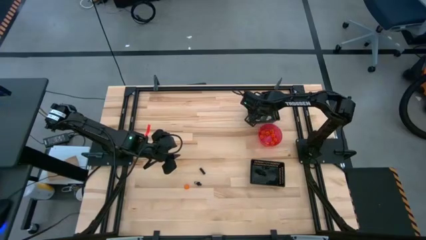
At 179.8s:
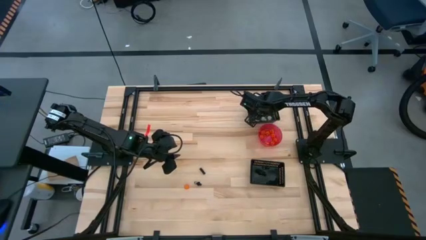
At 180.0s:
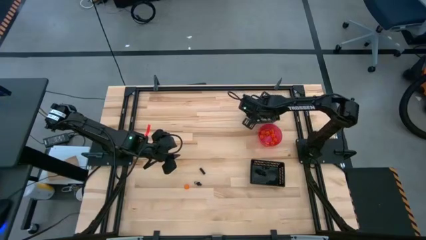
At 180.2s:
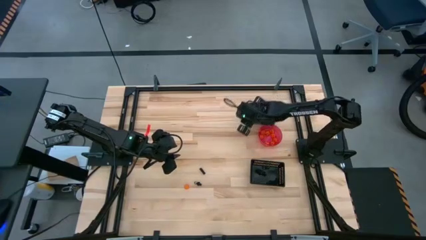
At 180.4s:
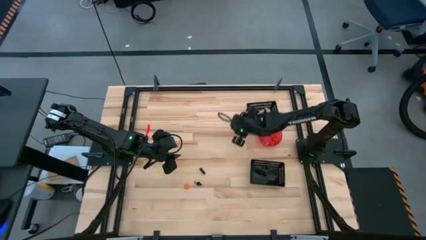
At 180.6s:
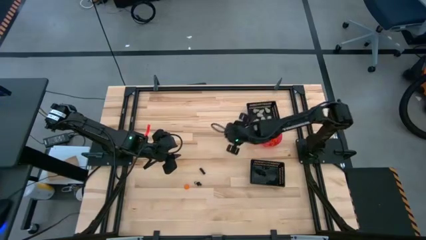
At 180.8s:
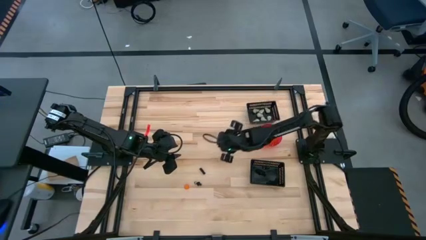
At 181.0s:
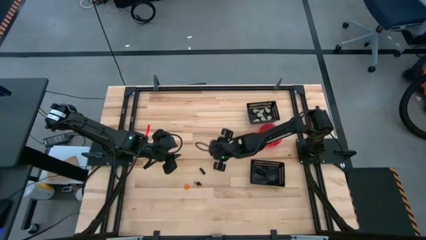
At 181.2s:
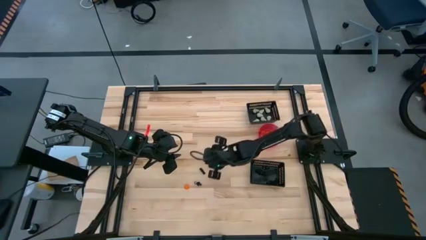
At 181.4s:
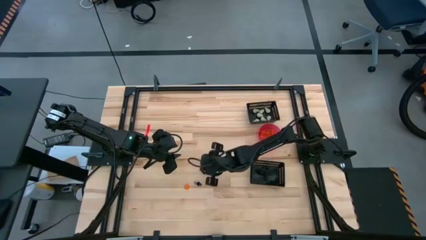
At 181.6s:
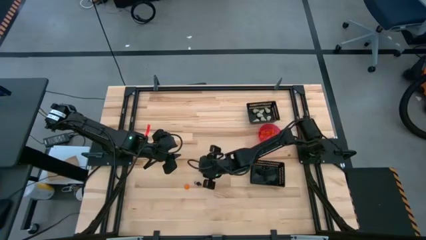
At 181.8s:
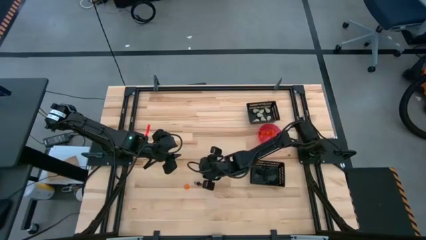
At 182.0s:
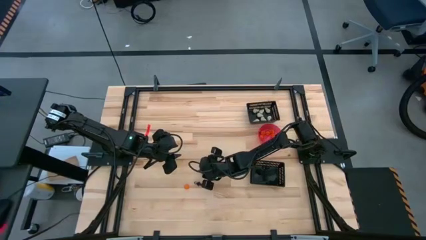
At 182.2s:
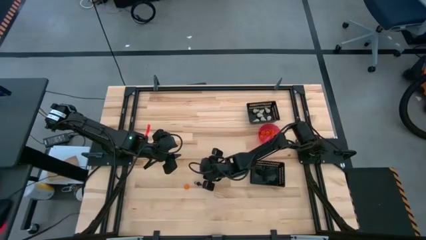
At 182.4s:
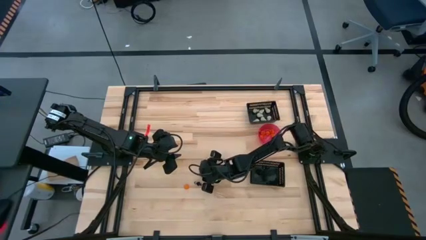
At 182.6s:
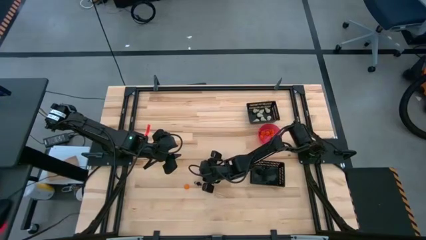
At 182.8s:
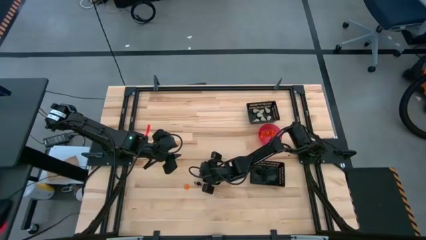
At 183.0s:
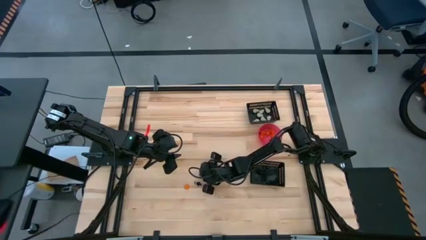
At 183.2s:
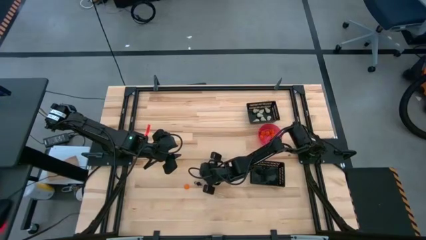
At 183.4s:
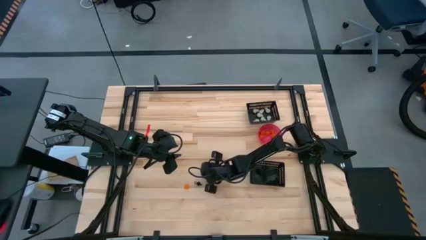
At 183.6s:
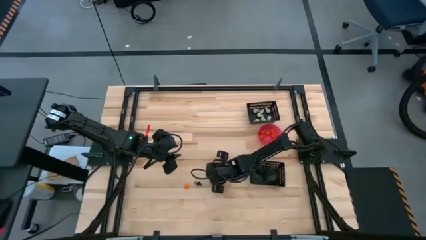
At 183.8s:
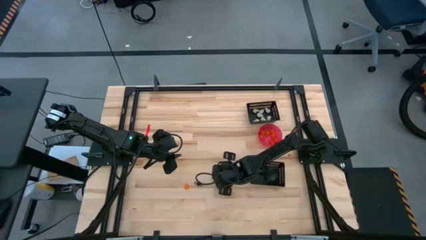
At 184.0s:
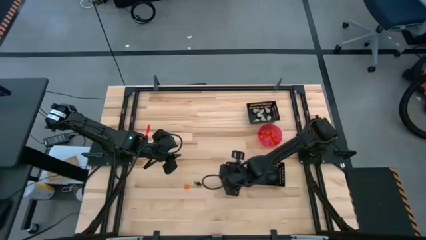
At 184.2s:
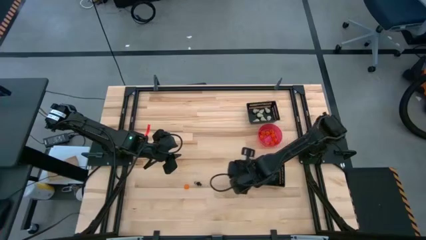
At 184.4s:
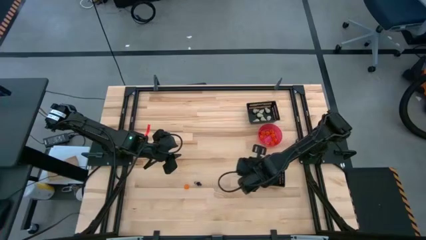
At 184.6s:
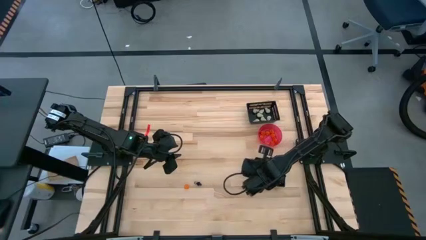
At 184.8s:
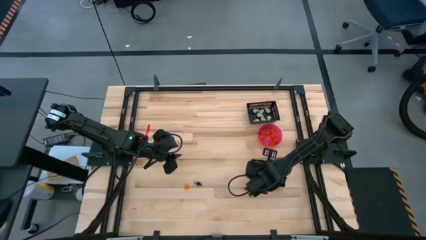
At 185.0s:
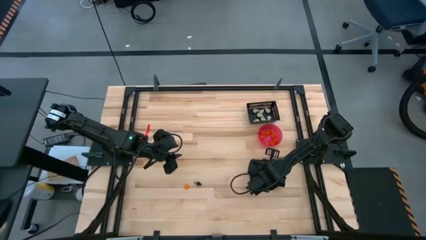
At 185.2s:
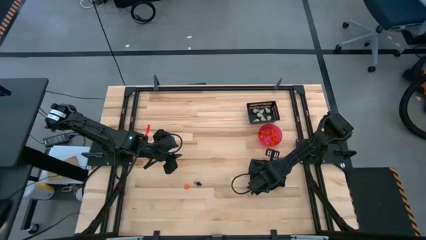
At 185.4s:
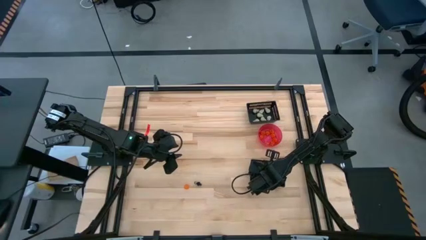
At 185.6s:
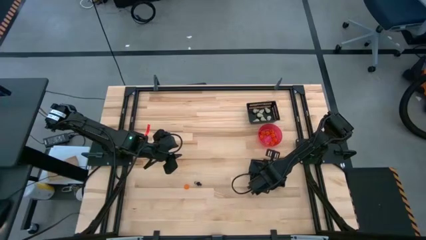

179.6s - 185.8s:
Task: Sort Halloween decoration
Put the black skeleton toy into the bottom black bin

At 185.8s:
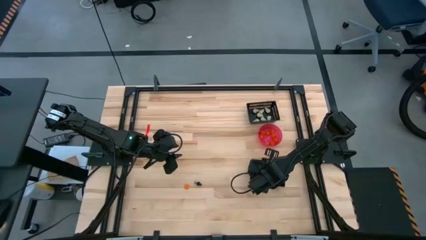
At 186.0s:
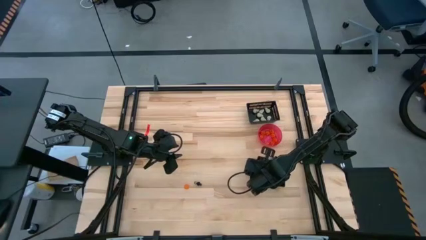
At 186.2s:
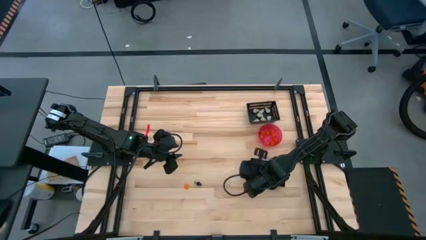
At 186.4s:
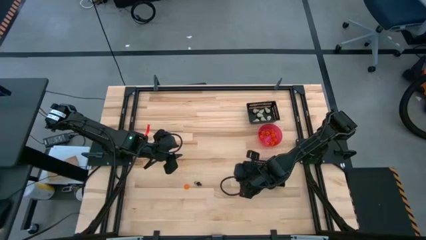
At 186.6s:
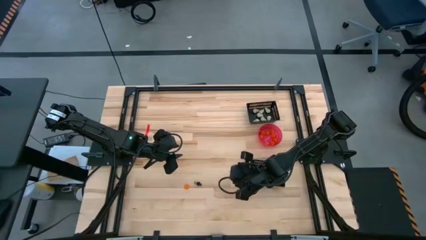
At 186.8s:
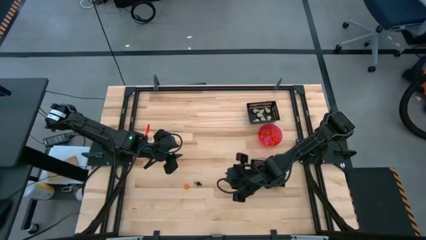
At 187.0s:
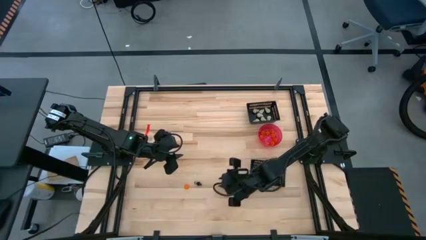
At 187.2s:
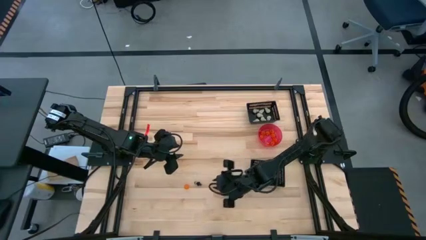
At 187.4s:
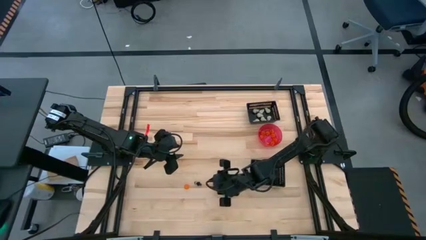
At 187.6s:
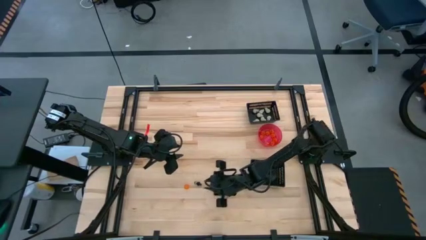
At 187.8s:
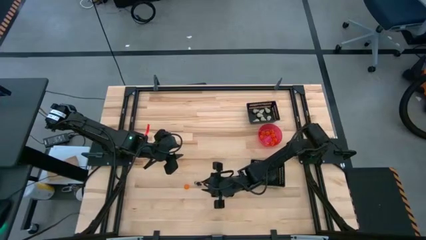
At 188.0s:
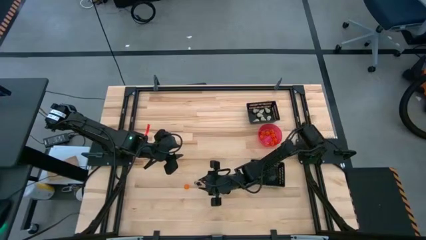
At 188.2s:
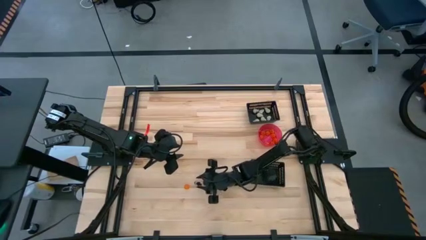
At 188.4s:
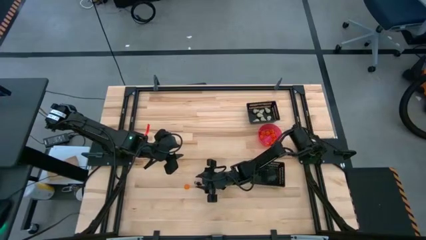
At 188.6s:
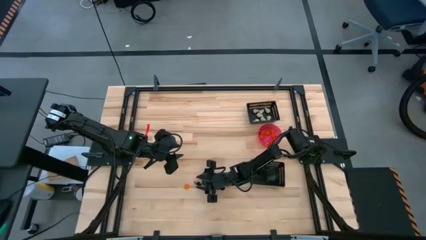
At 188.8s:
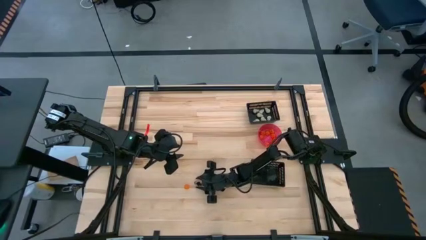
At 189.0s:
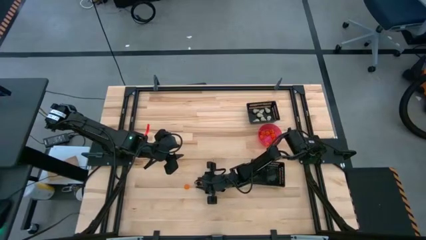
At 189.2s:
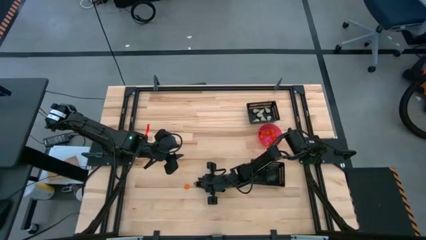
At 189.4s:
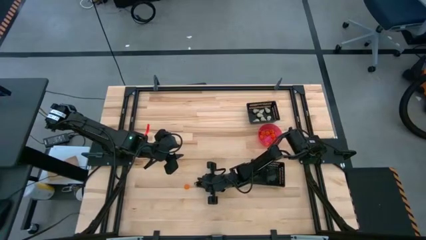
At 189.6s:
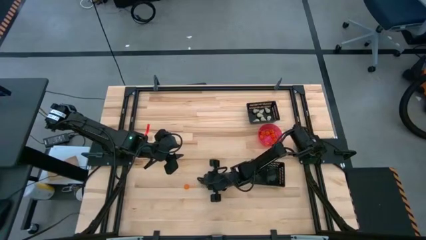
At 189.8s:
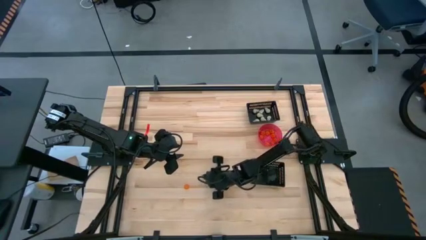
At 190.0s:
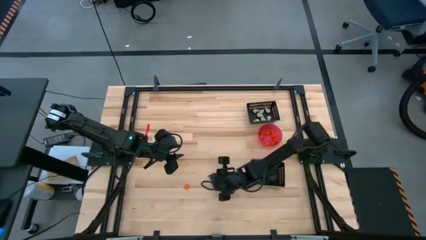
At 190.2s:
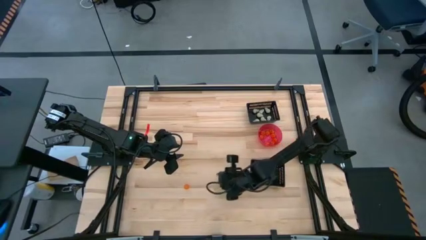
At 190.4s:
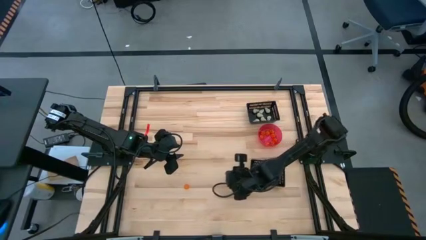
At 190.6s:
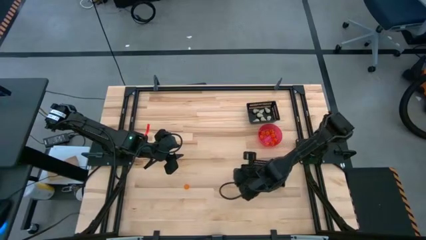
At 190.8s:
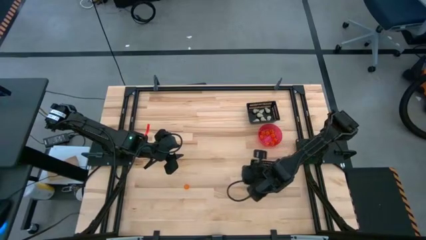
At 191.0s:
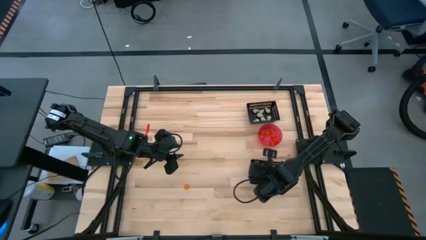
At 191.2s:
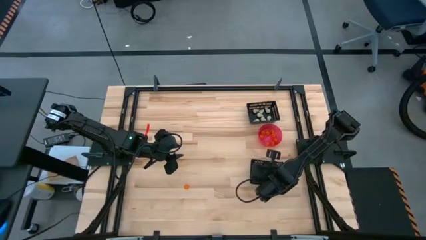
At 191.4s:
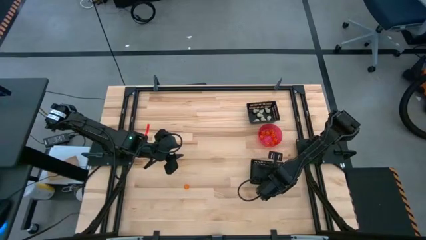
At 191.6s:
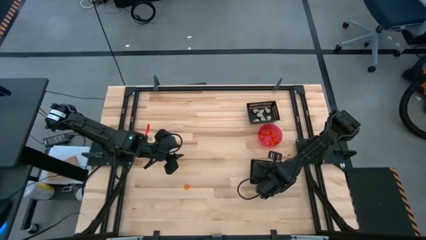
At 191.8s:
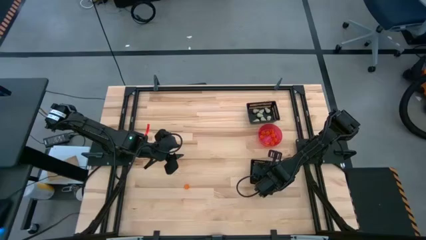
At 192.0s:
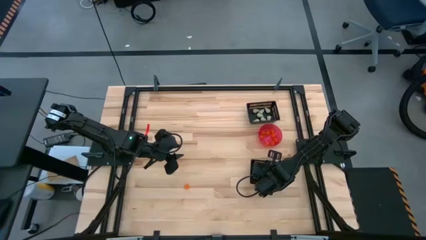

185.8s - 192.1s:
Put the black skeleton toy into the bottom black bin

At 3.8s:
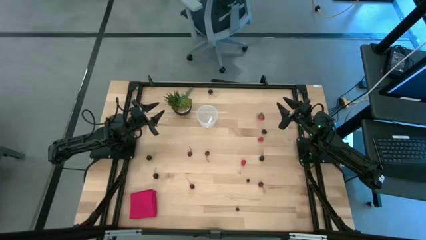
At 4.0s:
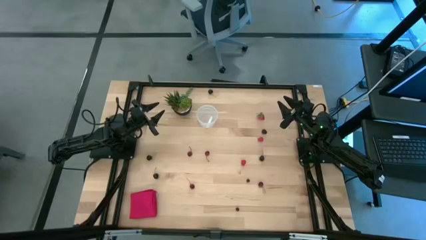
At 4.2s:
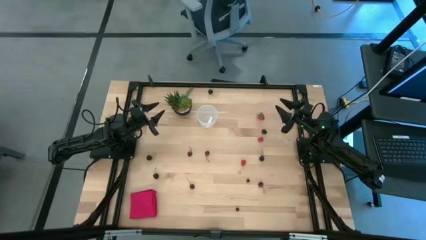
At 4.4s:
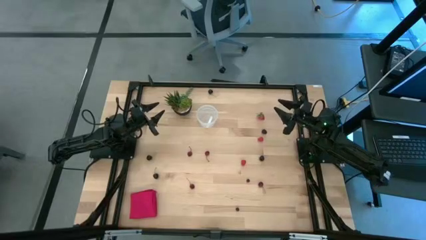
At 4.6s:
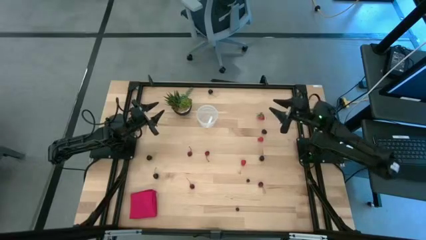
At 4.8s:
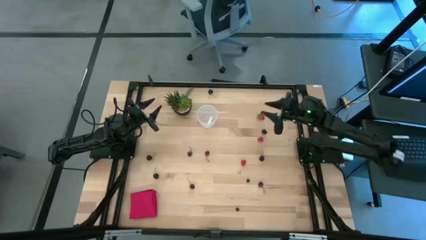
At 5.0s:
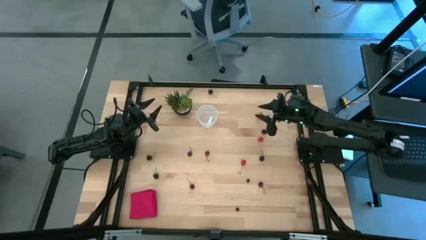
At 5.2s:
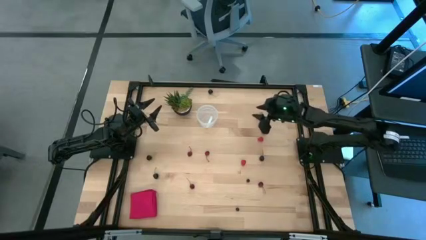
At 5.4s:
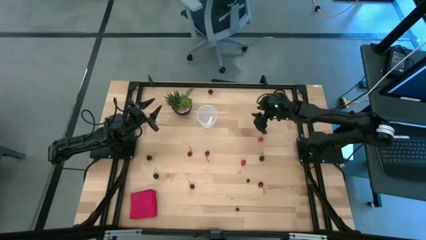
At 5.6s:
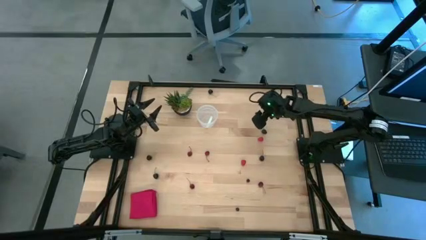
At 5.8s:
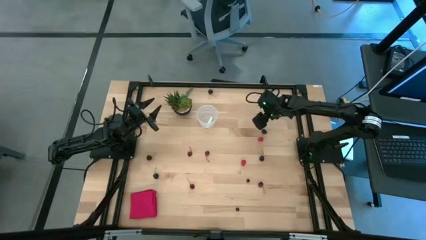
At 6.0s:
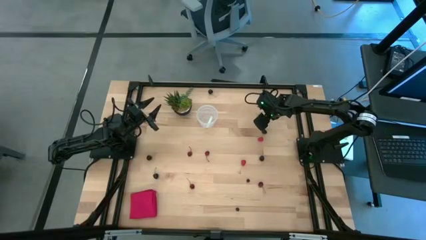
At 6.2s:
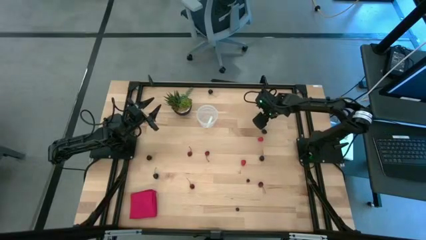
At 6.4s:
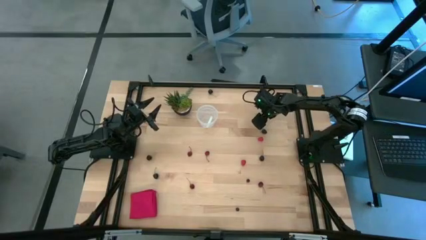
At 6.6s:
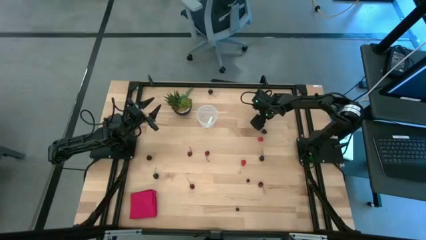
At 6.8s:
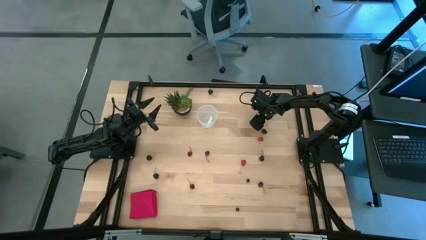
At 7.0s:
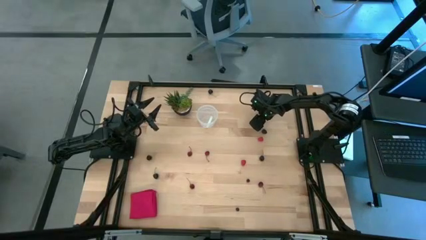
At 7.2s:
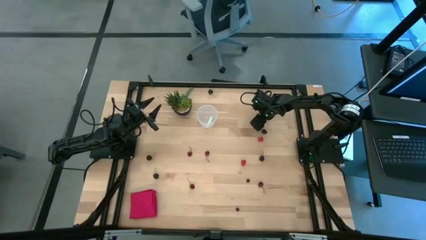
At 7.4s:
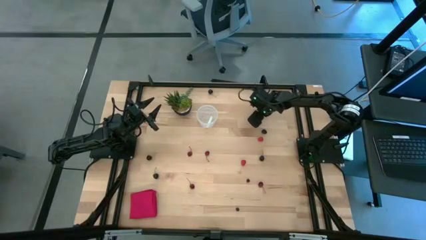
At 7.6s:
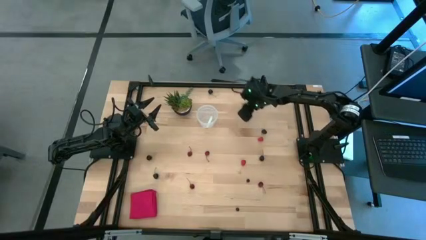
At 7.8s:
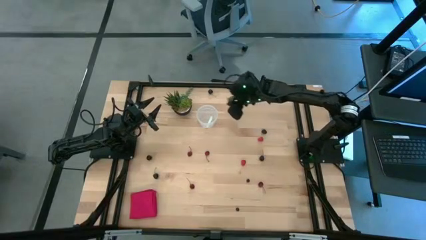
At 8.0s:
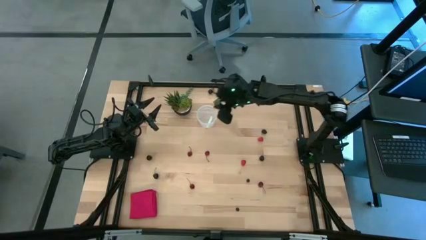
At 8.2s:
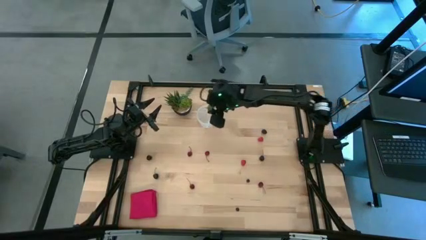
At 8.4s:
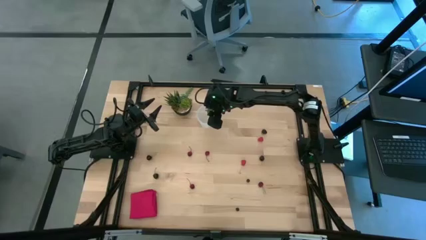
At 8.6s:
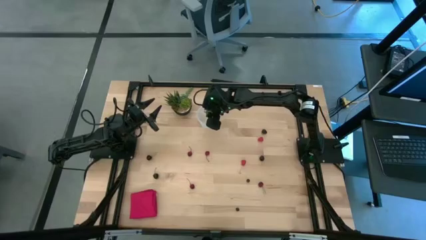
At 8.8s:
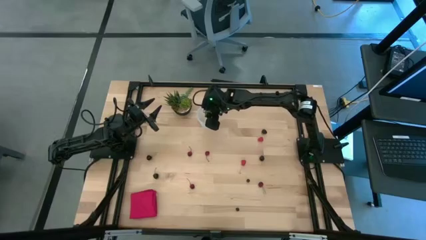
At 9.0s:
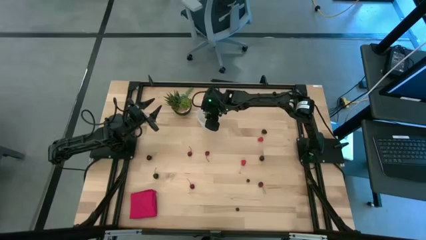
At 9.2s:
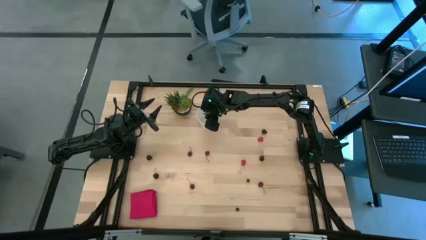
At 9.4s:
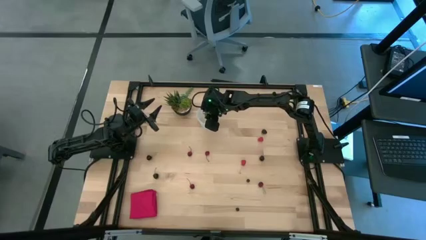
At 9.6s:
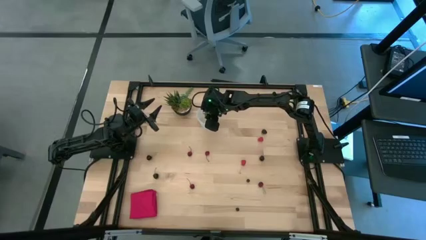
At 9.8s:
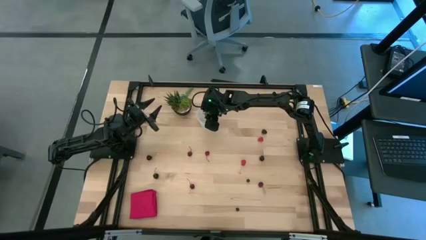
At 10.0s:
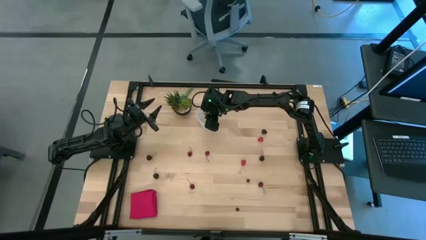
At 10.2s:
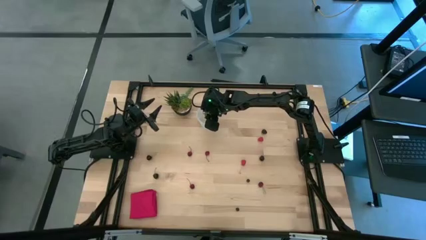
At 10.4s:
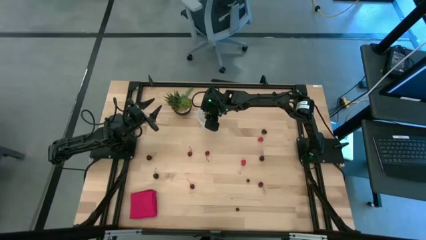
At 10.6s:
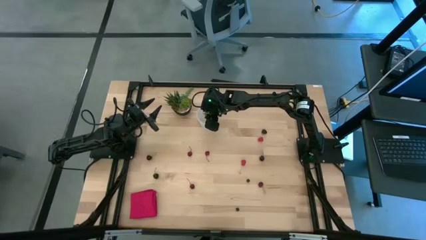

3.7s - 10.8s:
Task: Pick and placing Produce into tupperware
Put the red strawberry into the transparent container
